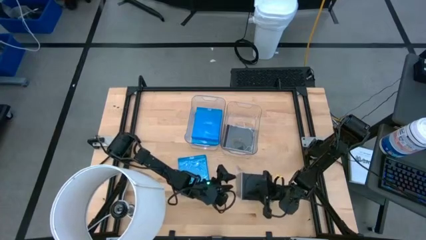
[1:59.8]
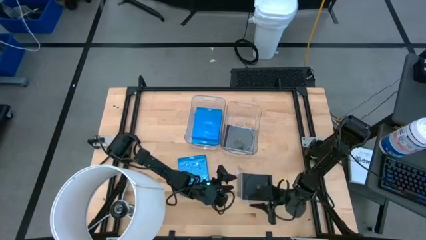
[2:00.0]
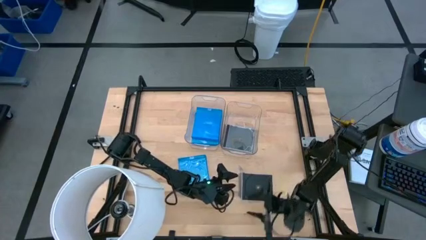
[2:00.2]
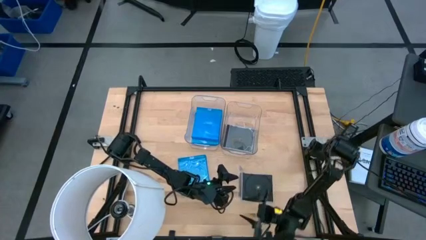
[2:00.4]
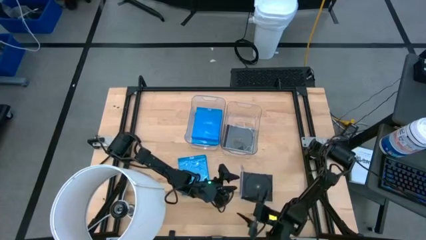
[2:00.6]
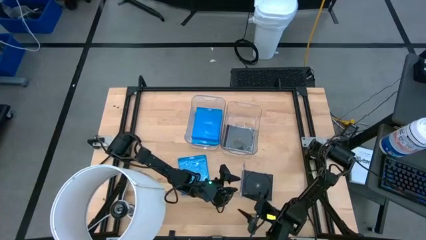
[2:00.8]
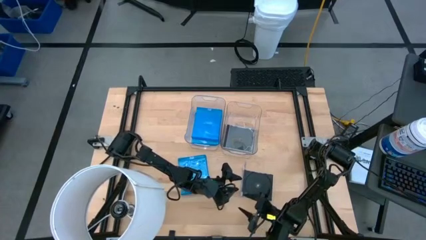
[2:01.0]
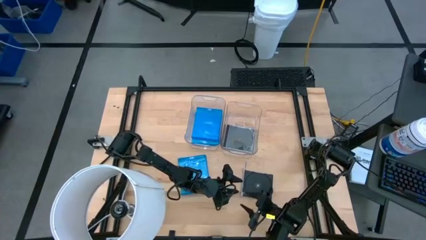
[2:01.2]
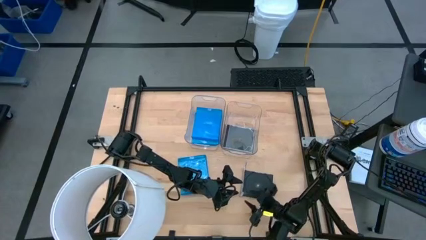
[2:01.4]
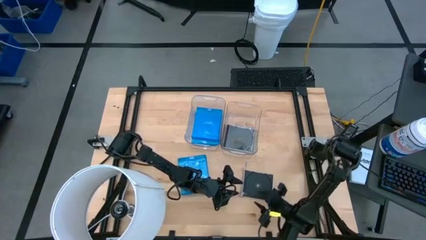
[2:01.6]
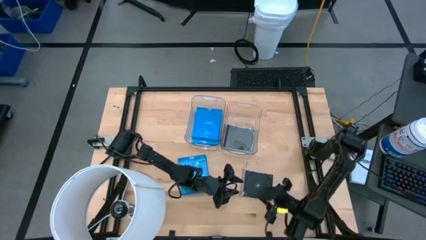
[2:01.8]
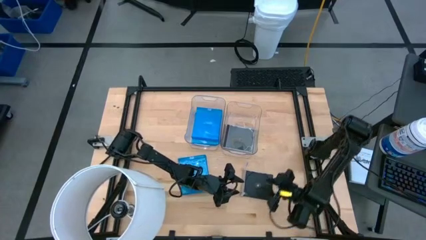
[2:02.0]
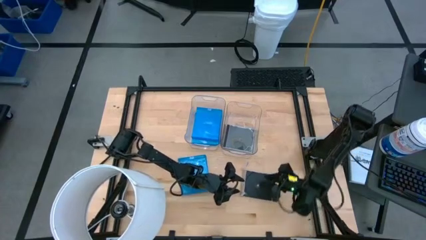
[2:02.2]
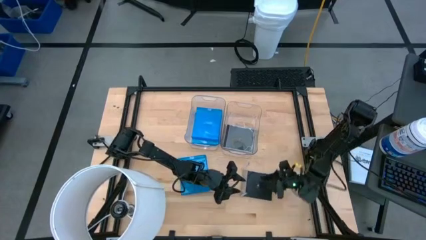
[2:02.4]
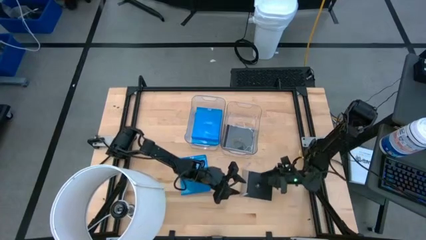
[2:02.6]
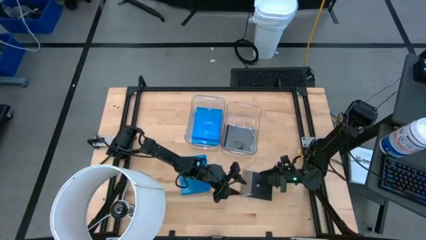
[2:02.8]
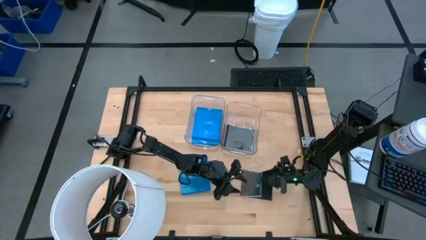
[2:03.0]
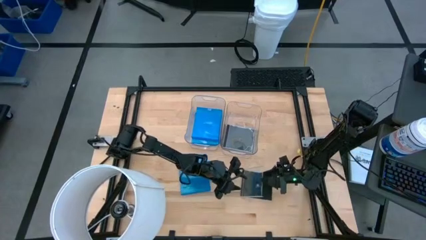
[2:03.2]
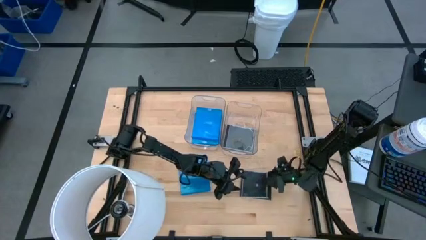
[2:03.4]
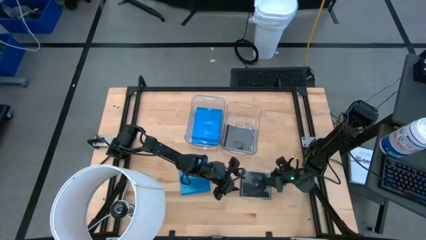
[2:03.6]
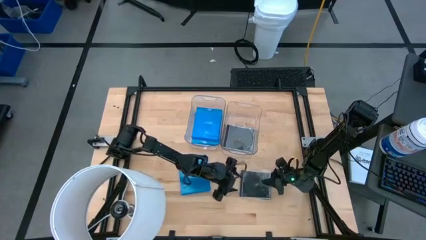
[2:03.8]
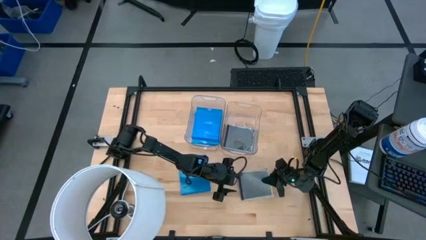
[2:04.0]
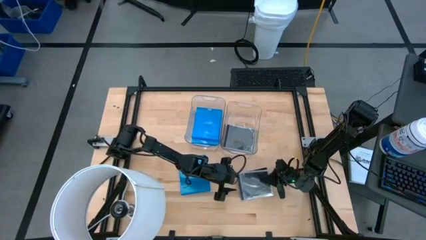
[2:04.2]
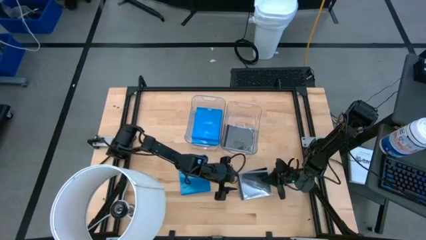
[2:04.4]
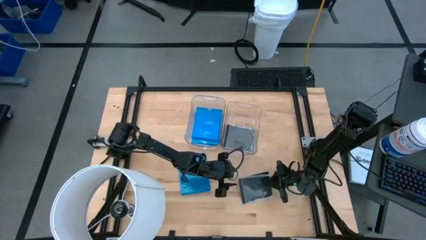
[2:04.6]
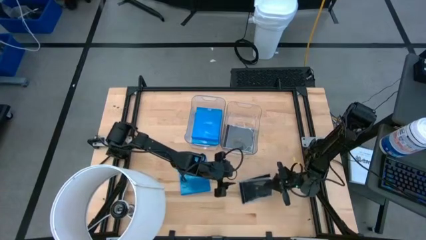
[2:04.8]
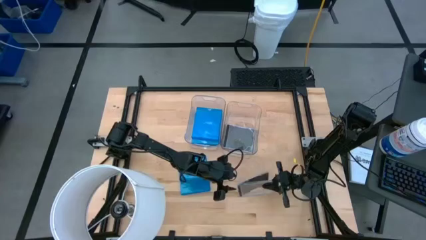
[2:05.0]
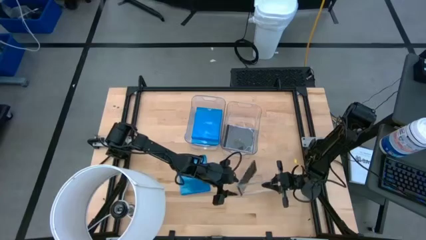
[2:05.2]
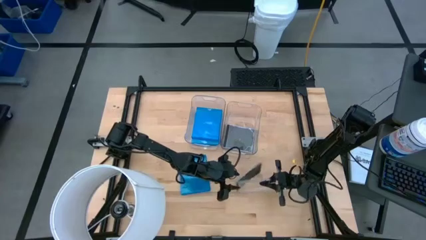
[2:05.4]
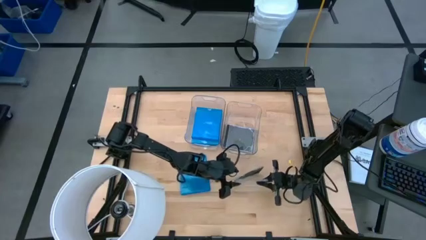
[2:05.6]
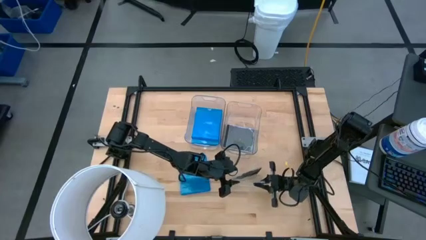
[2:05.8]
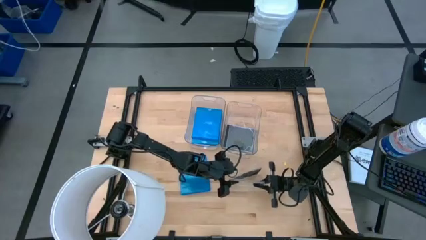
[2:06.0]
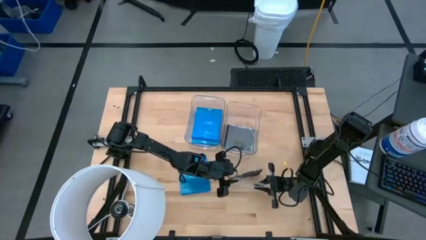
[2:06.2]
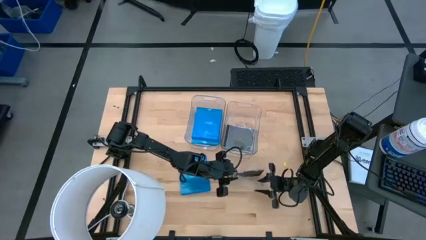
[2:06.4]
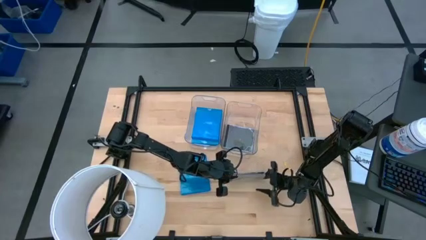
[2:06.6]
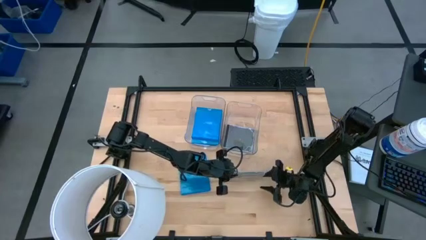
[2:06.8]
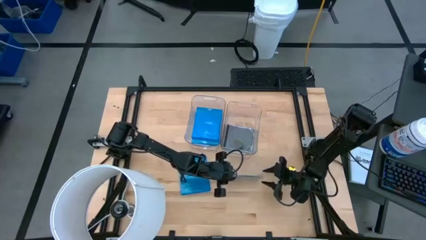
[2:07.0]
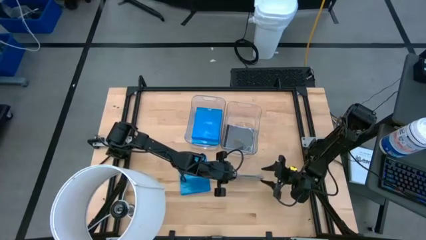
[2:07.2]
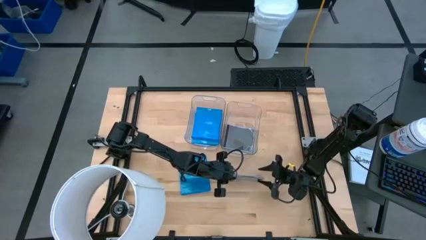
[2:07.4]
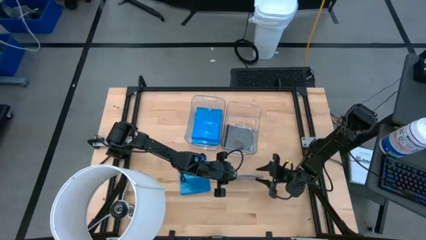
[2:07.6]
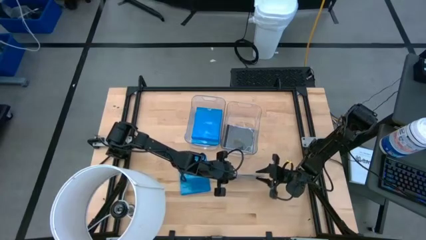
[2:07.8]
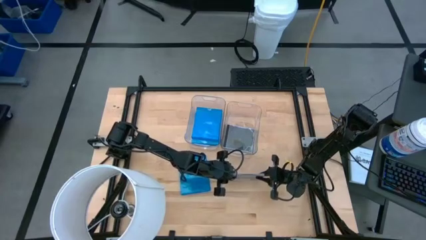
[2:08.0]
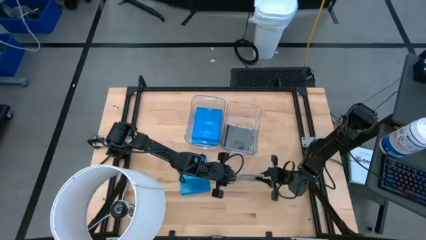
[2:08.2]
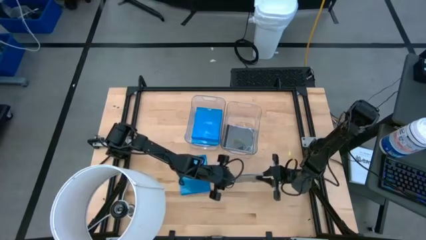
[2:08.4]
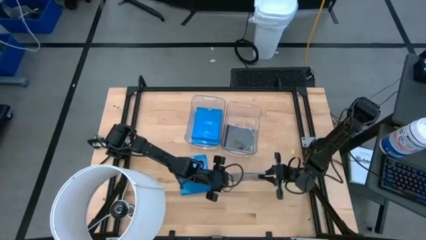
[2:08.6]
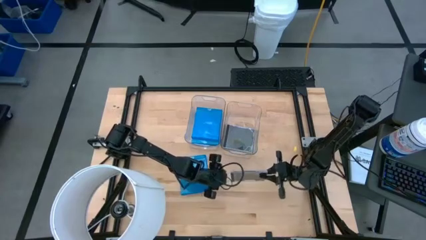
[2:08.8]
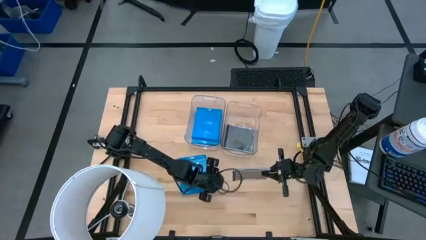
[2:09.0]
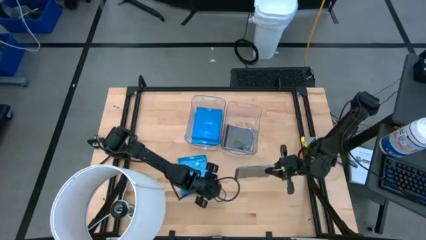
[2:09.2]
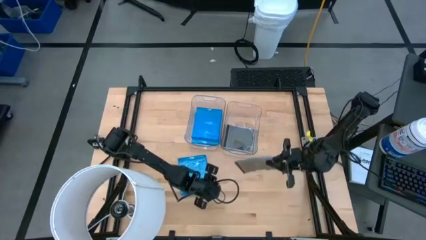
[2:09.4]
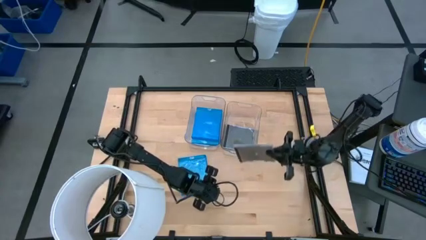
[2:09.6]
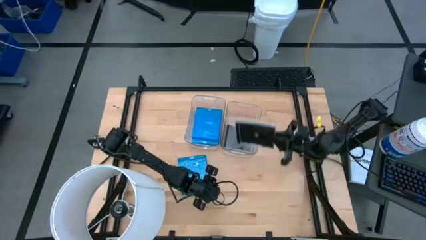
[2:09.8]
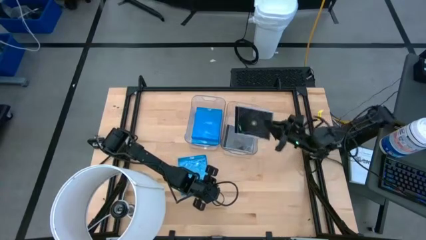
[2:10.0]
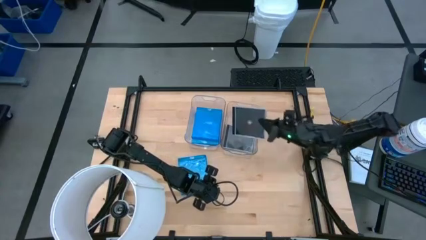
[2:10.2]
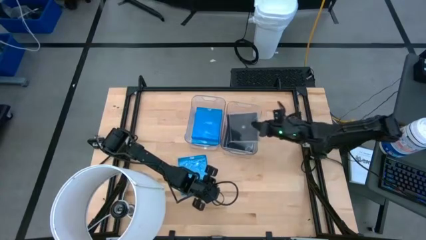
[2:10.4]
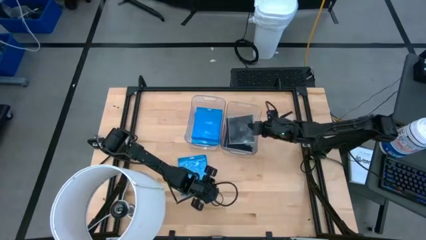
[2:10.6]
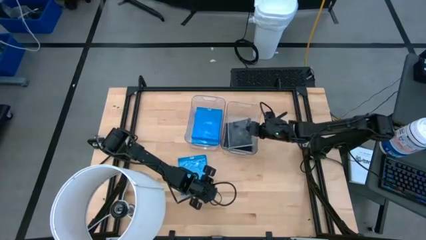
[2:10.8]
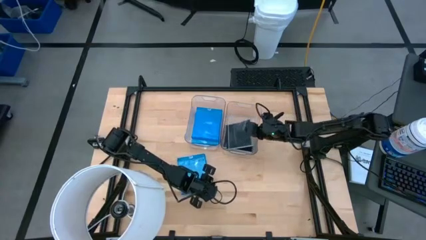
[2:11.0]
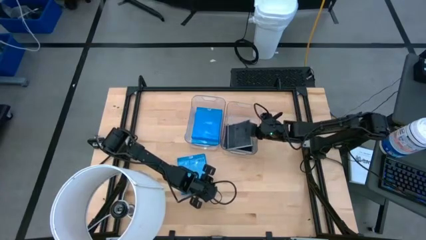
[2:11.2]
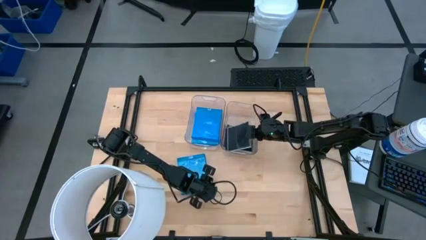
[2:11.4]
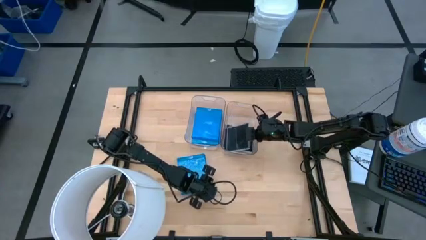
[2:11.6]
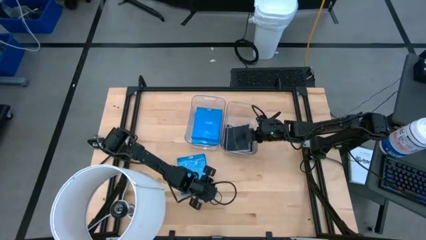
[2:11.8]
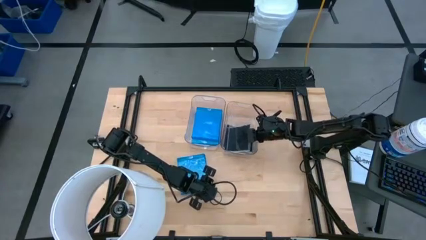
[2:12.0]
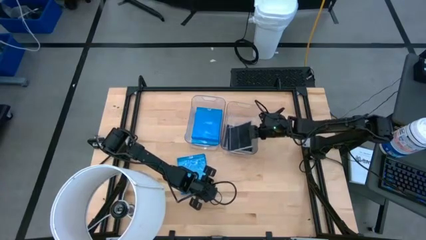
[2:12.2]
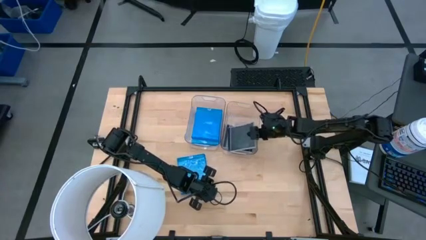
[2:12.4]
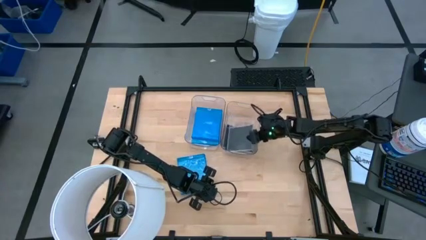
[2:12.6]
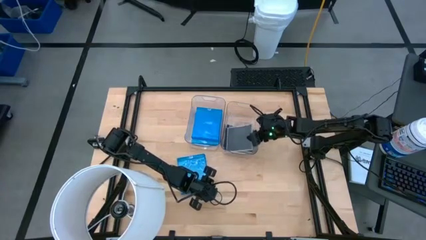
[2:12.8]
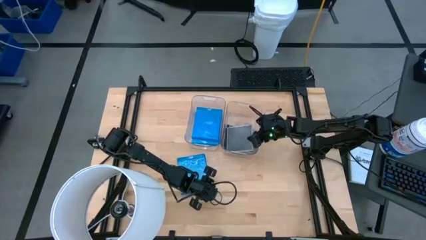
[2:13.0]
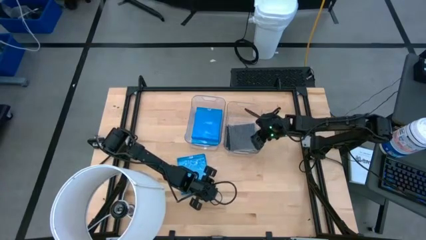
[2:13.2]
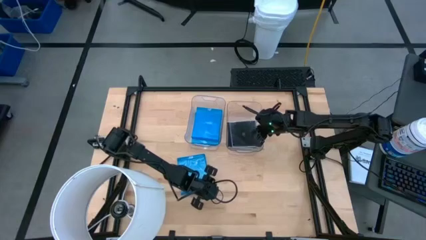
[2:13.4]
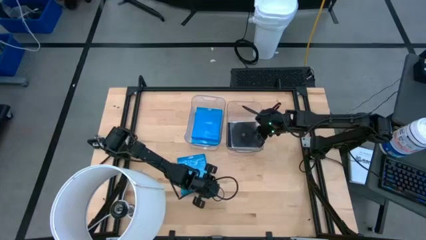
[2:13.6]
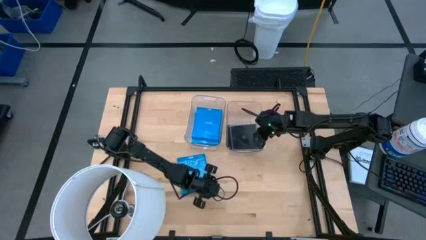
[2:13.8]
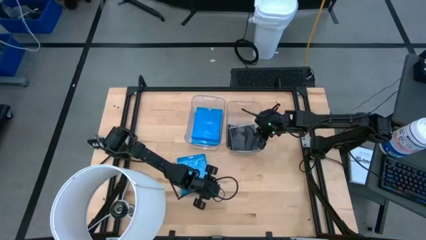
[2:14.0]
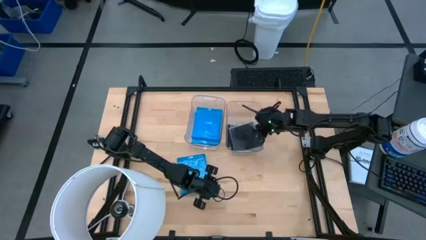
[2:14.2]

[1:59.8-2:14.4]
Task: Pick & place jewel cases by type
Put the black CD case into the right transparent bin

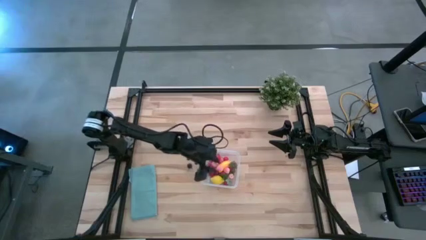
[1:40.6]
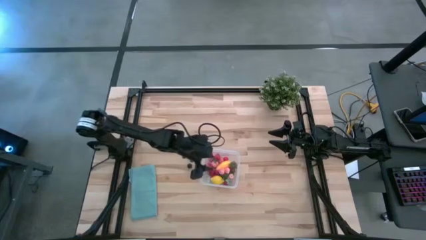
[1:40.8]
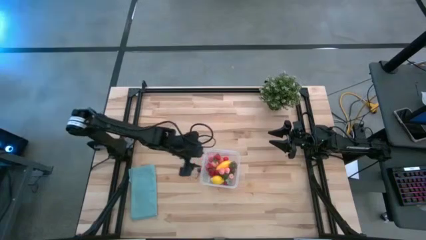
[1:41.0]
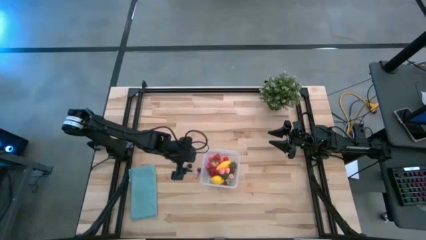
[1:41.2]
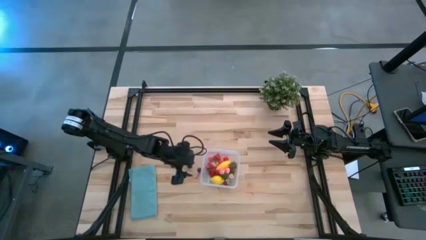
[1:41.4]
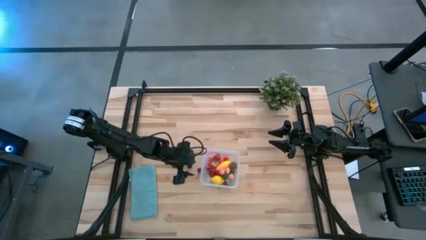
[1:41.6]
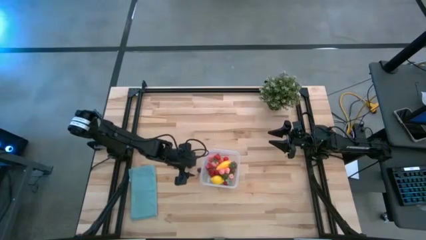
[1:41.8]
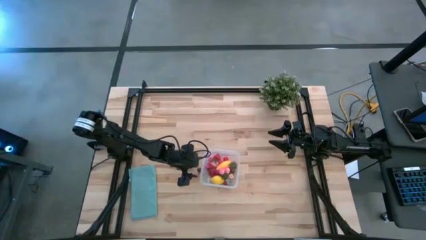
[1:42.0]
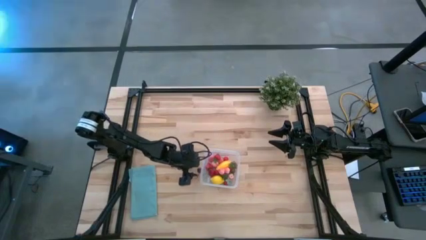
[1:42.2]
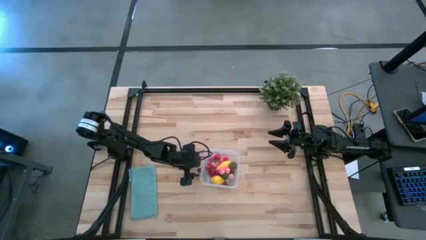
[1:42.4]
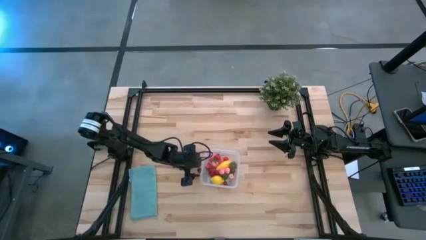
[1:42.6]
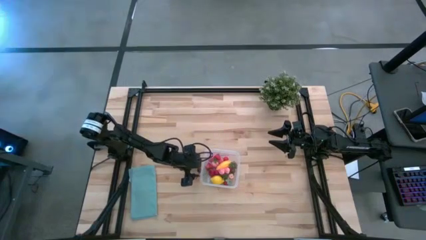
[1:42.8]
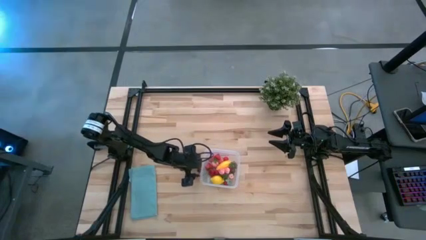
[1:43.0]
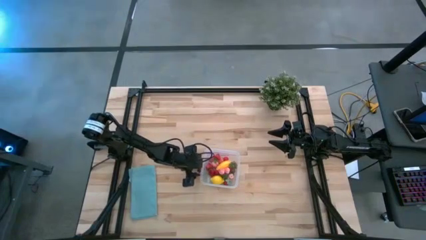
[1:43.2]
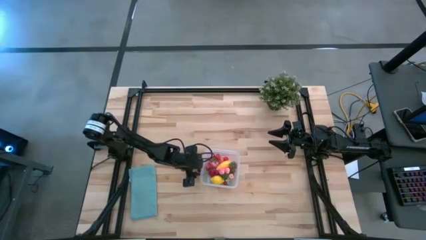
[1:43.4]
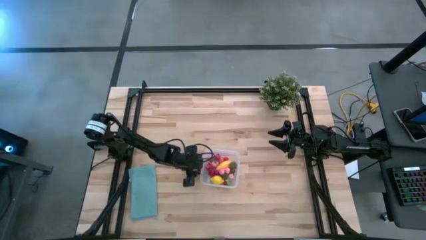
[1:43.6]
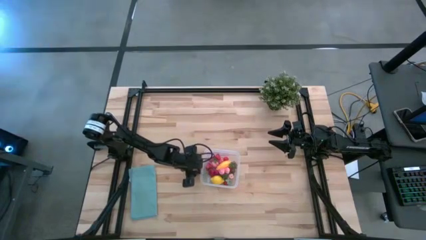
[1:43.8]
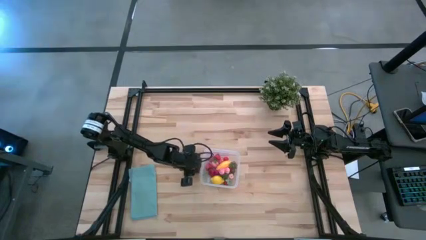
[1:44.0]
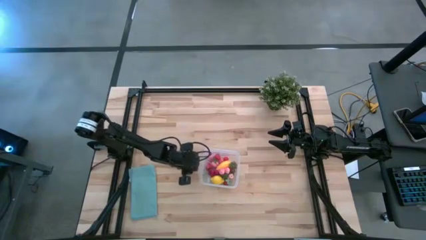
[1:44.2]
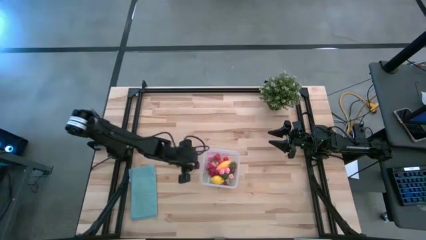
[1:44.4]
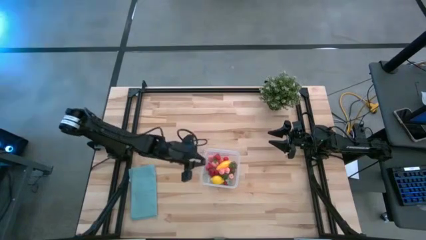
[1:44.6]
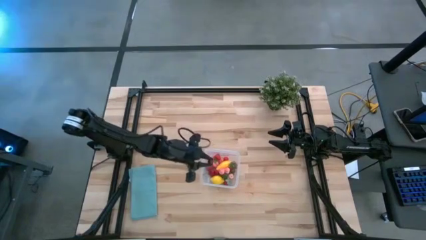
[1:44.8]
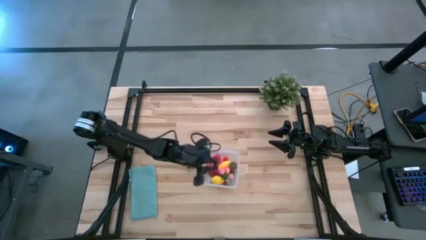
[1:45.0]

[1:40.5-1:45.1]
Task: Pick and placing Produce into tupperware
Put the dark red cherry into the transparent container
